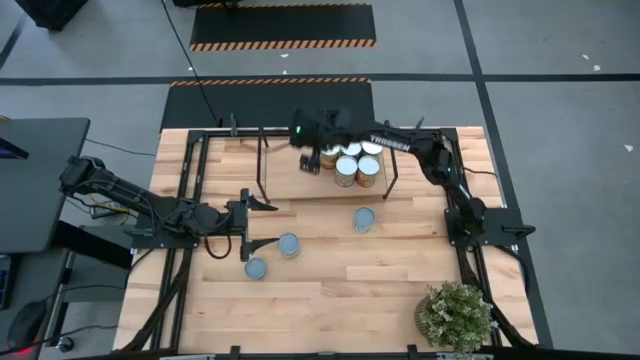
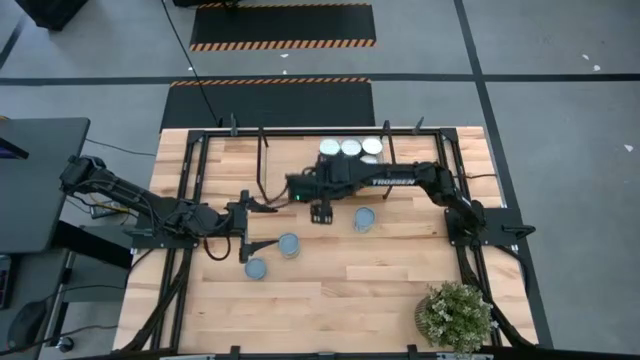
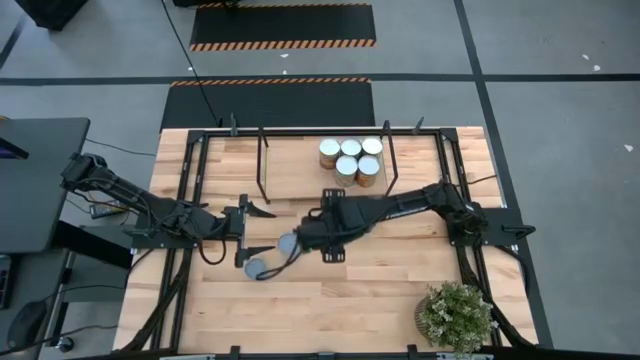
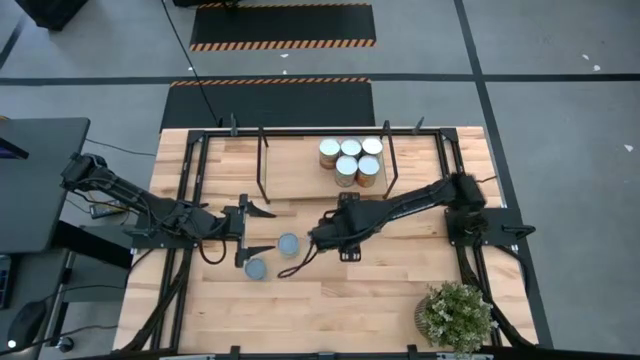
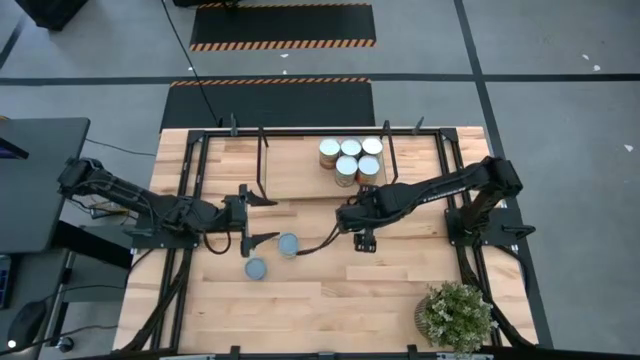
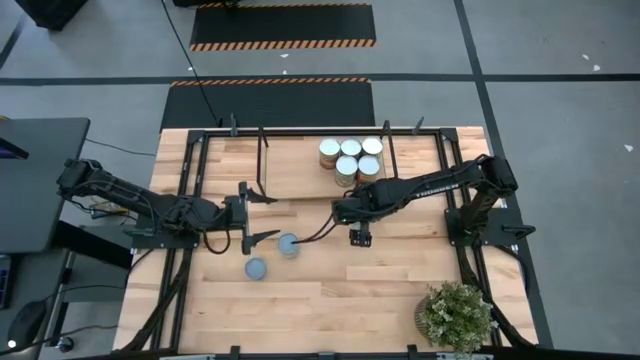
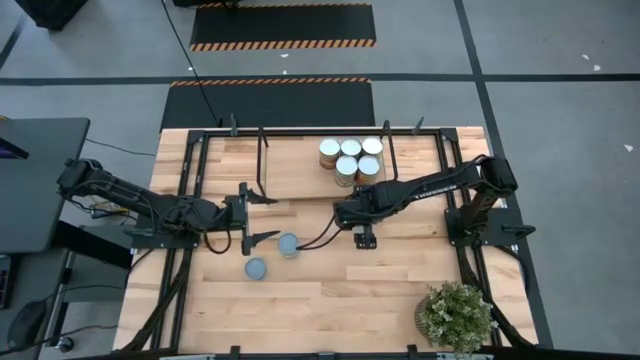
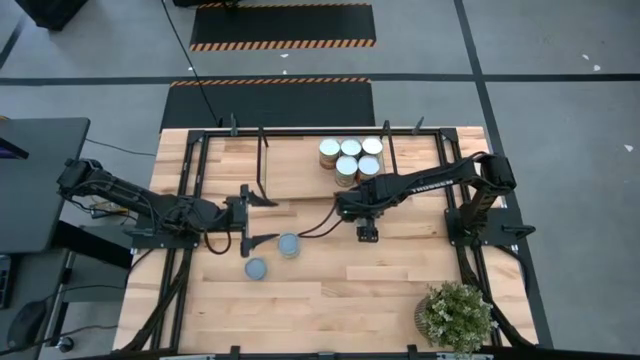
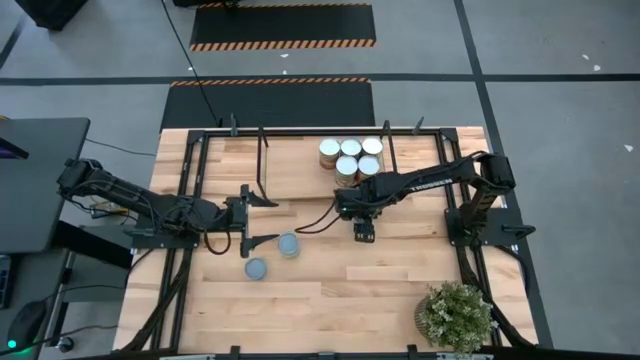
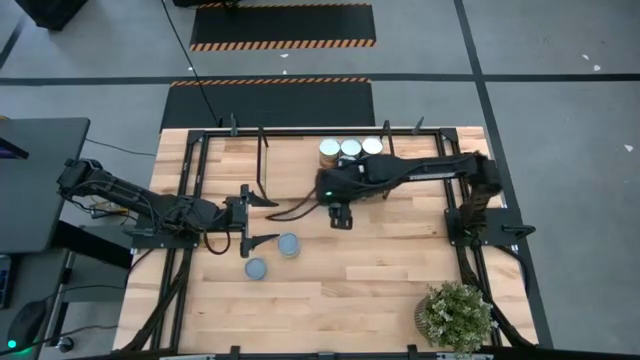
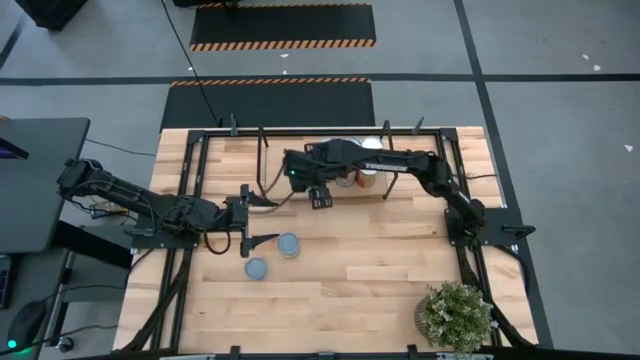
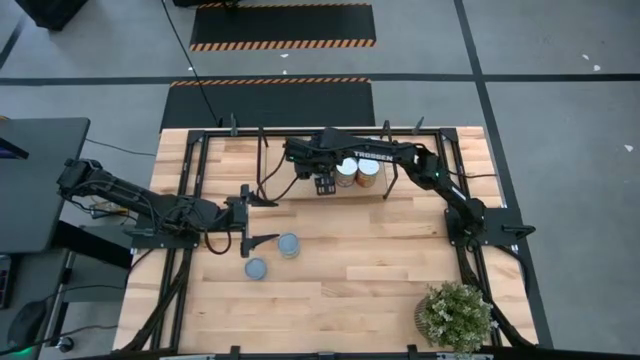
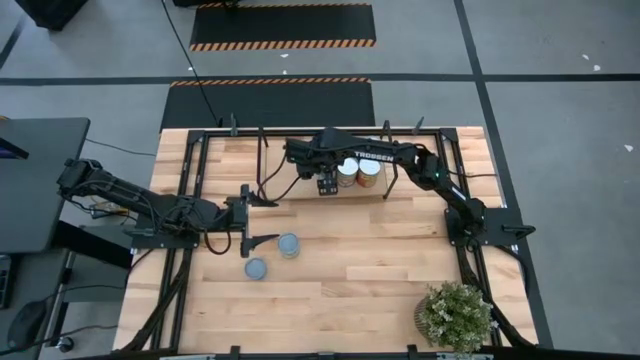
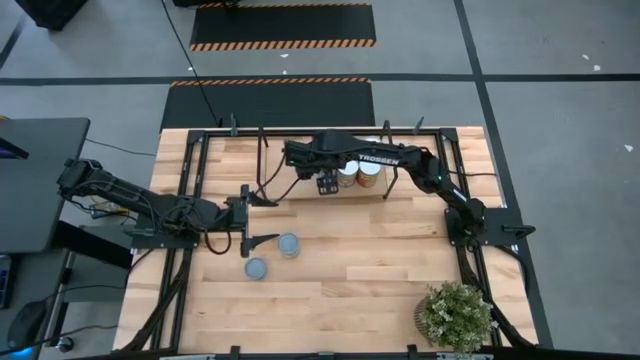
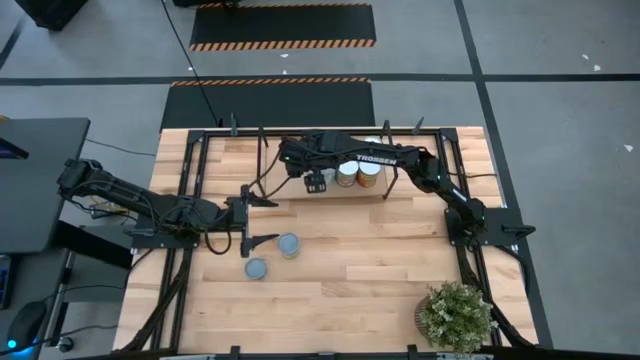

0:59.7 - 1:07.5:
Task: Pick and place cans onto a shelf
Put the canned mixed vegetables on the shelf

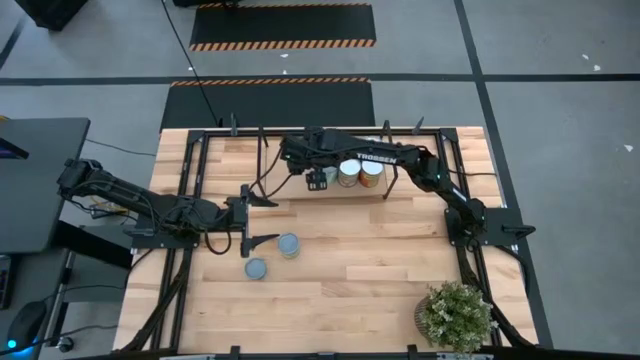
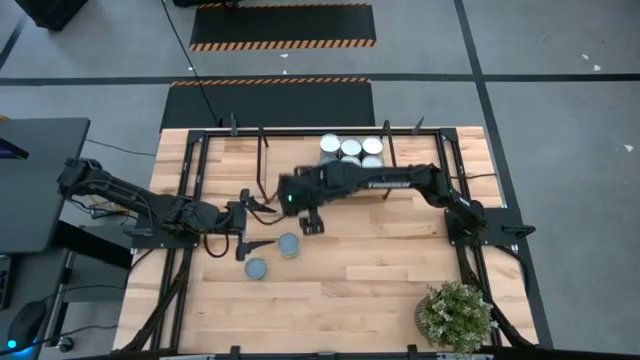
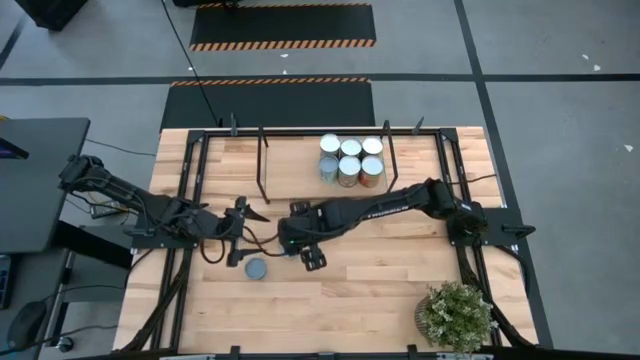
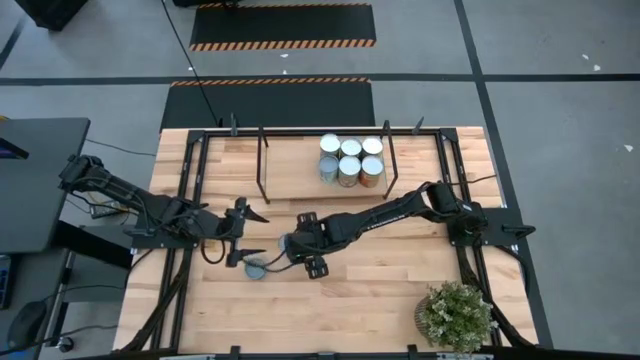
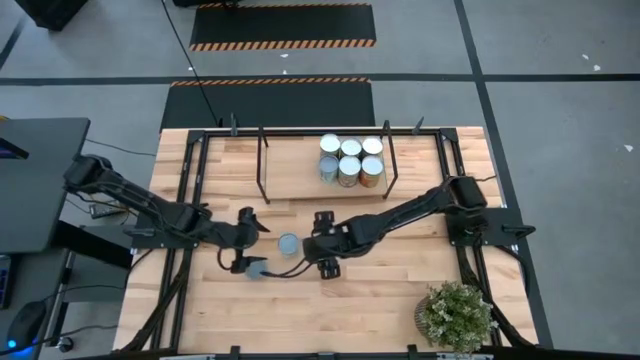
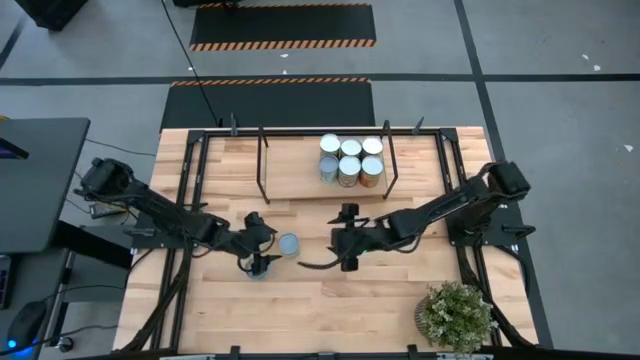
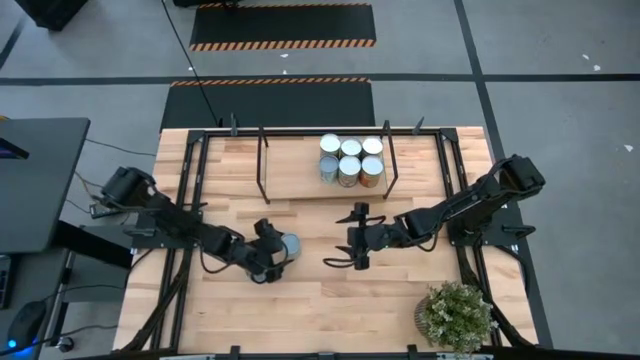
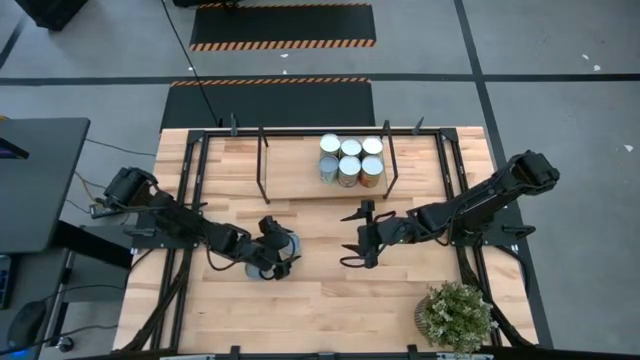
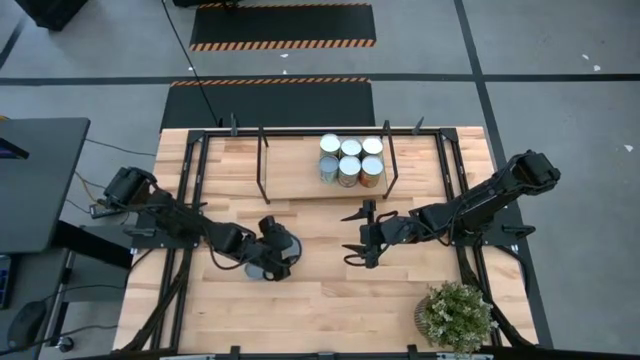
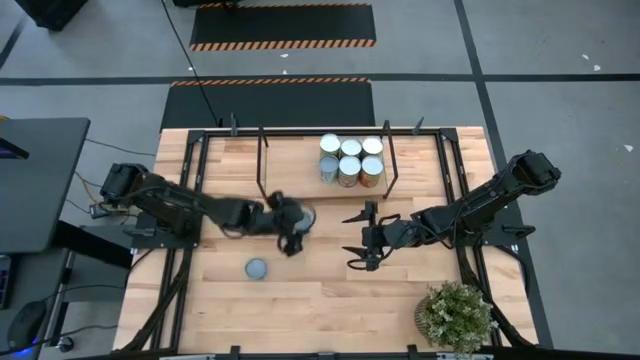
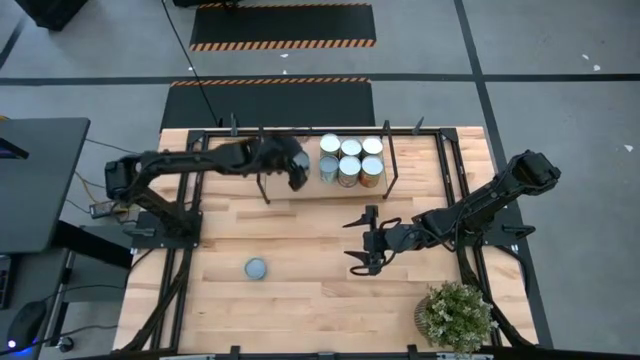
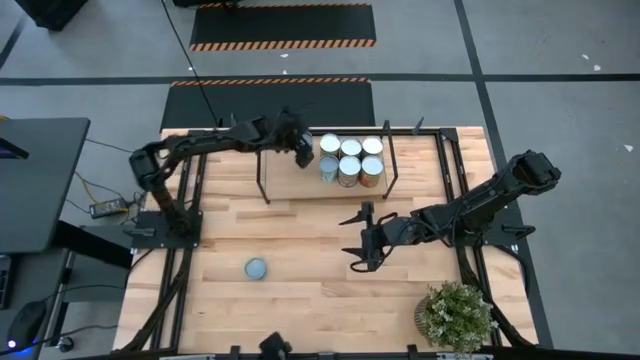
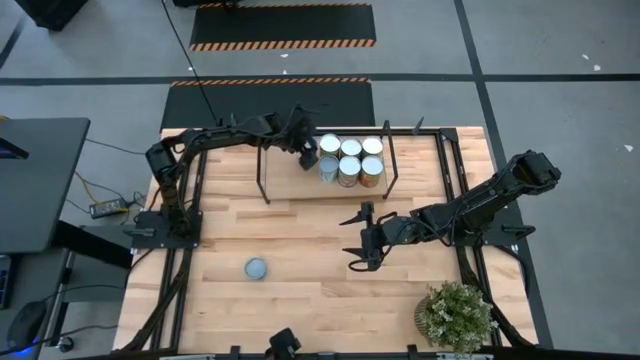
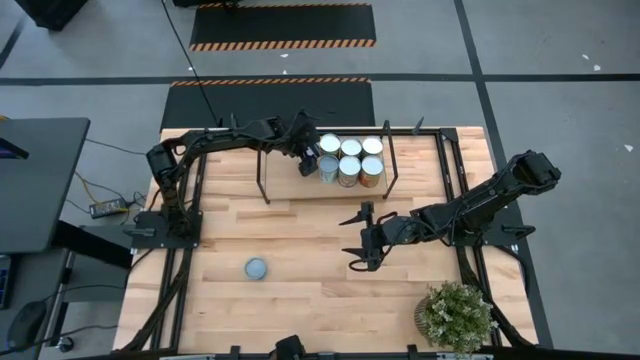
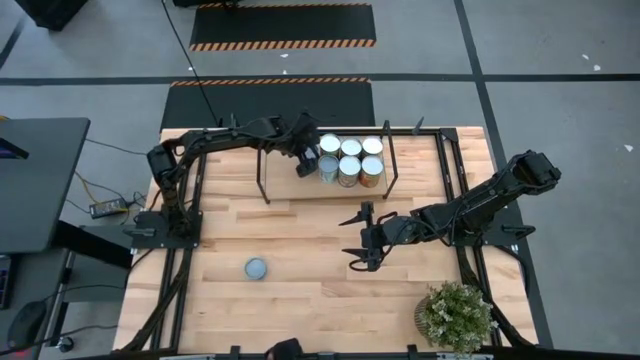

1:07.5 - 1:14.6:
Put the canned chicken soup on the shelf

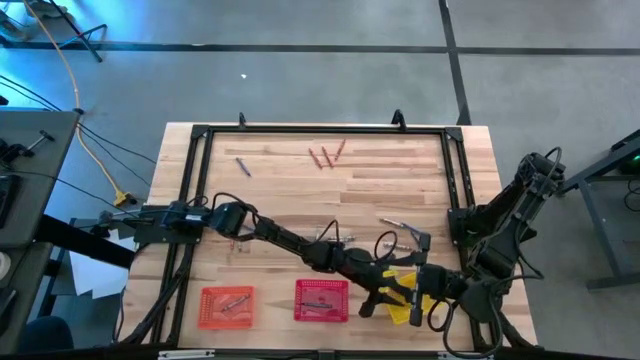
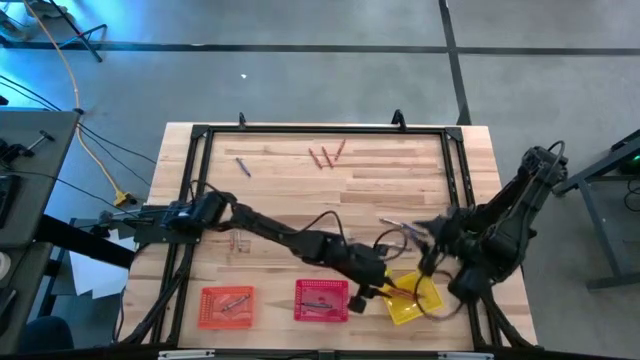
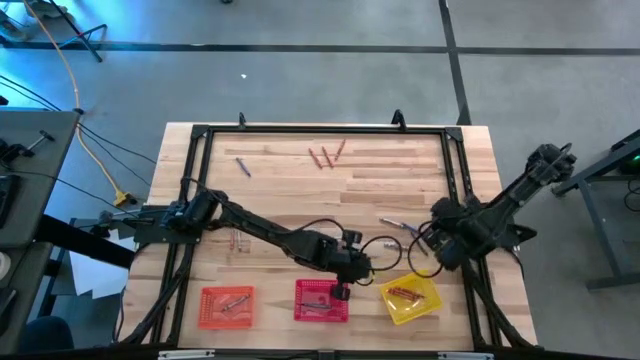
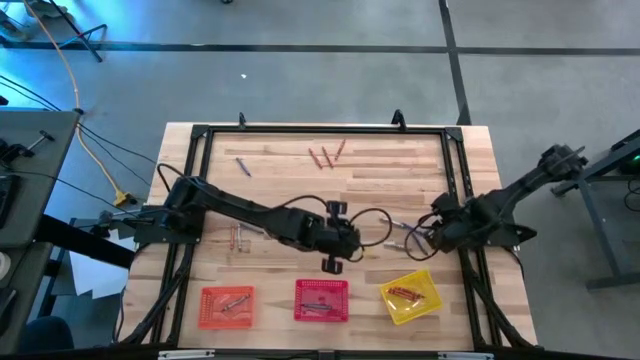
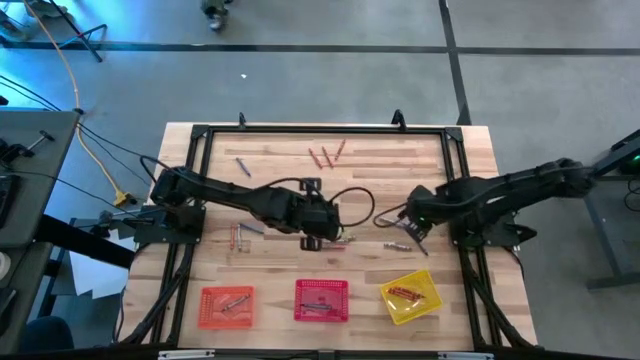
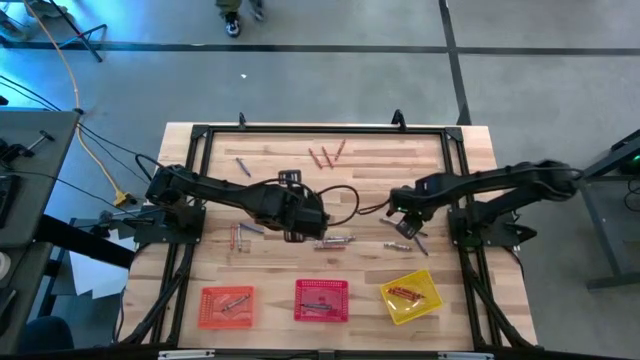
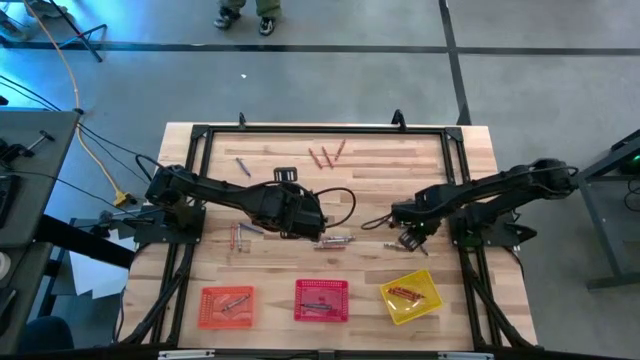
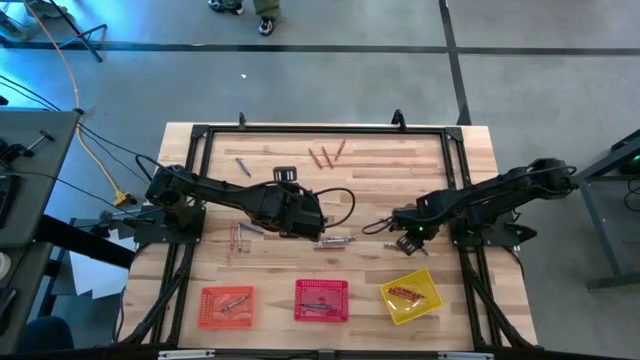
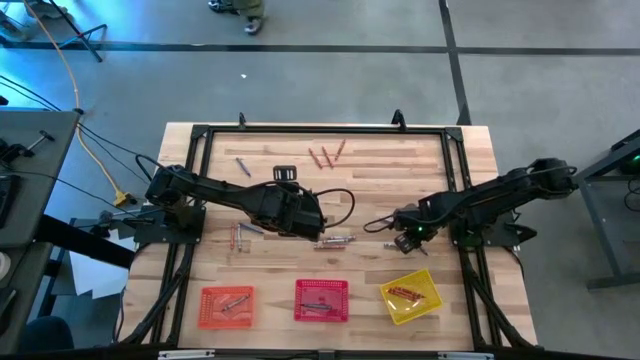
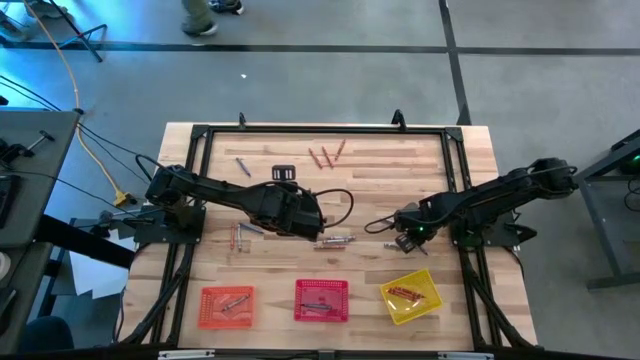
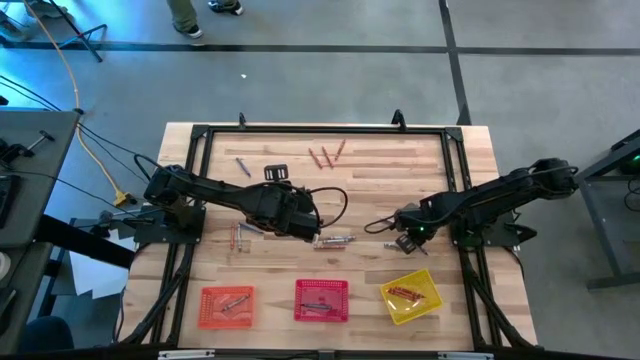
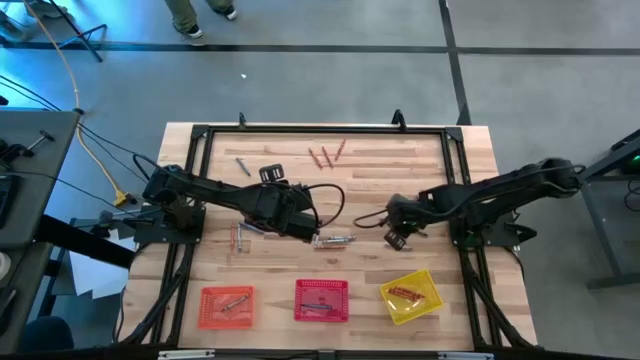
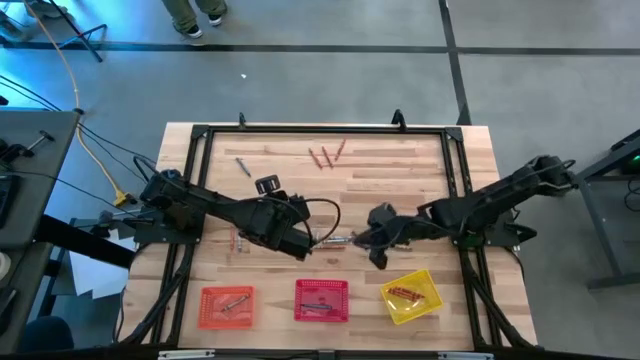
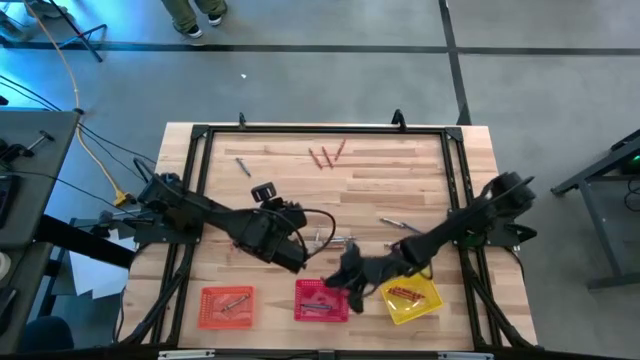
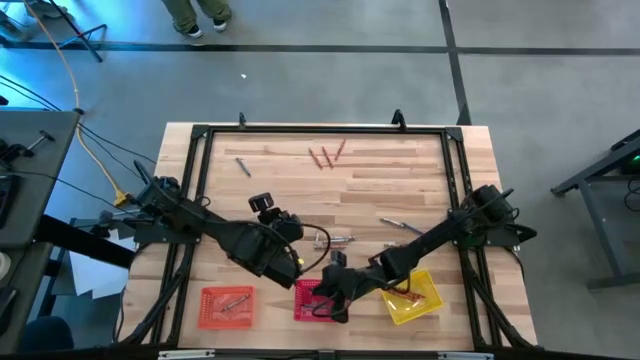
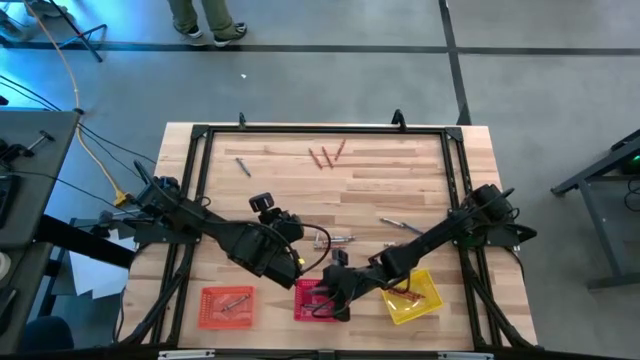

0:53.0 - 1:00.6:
Task: Sort crayons
Put the blue crayon into the red bin
